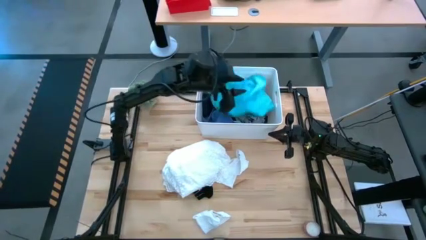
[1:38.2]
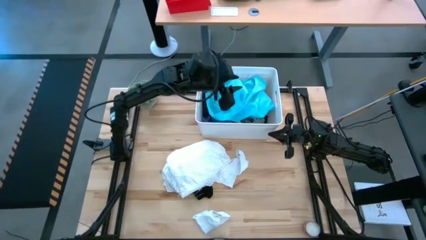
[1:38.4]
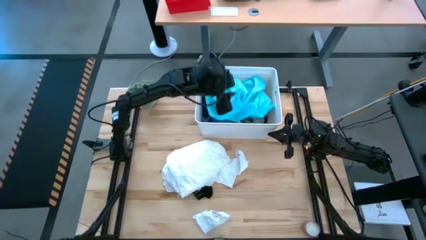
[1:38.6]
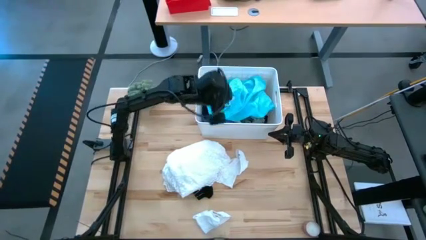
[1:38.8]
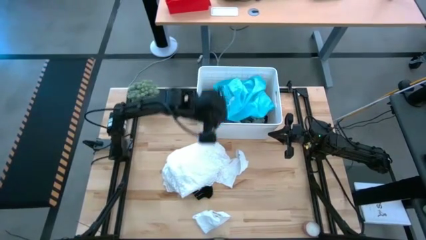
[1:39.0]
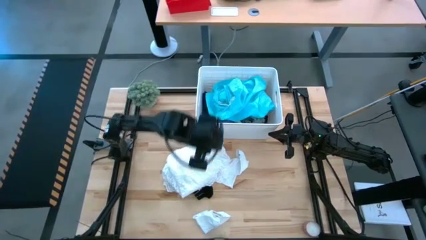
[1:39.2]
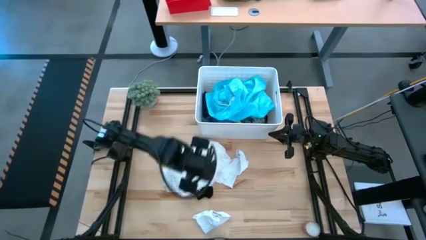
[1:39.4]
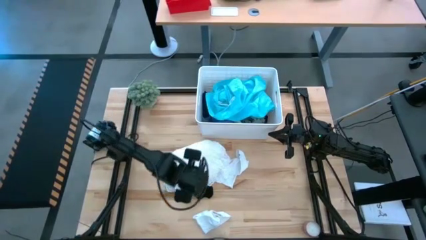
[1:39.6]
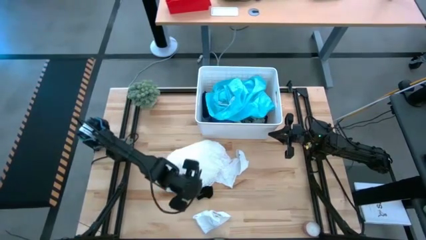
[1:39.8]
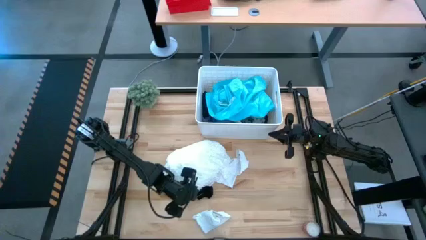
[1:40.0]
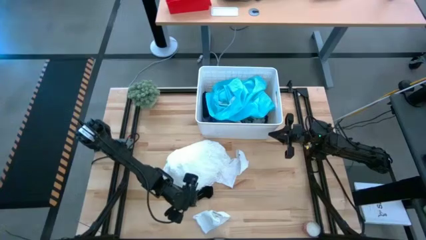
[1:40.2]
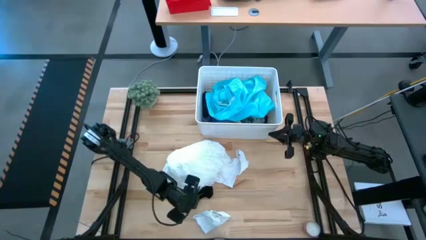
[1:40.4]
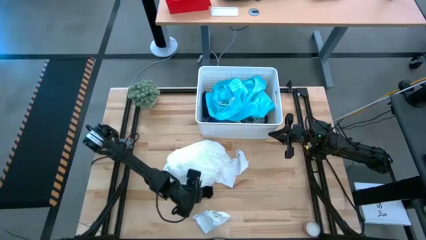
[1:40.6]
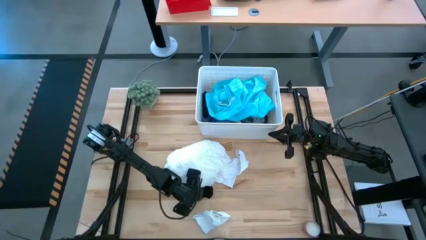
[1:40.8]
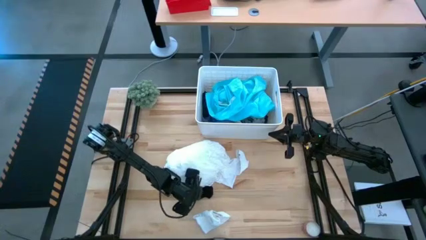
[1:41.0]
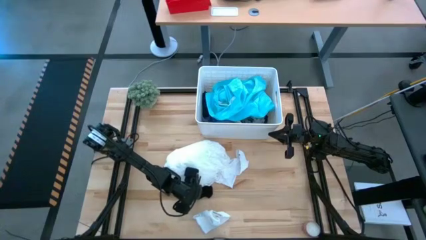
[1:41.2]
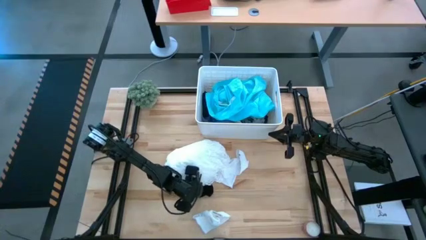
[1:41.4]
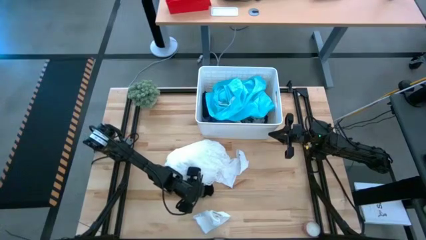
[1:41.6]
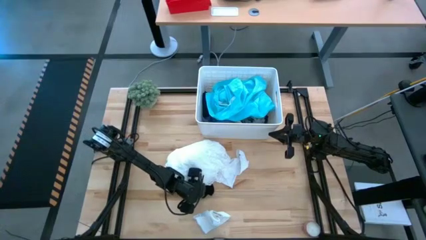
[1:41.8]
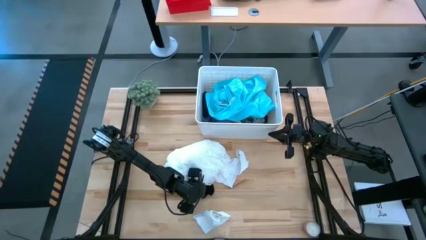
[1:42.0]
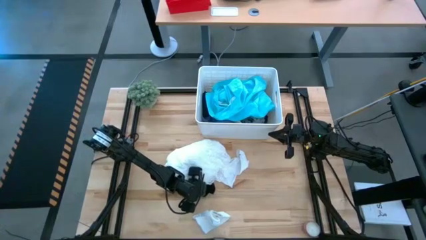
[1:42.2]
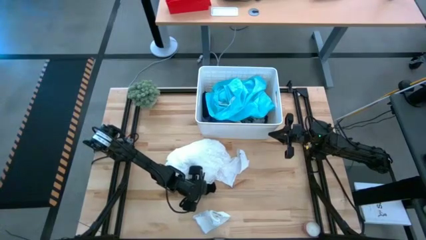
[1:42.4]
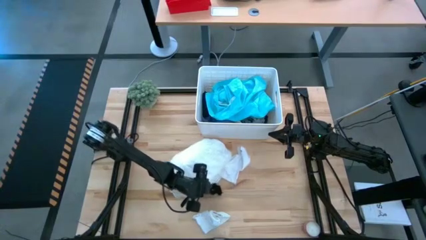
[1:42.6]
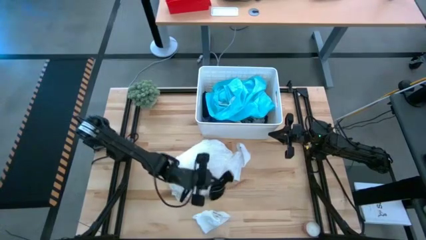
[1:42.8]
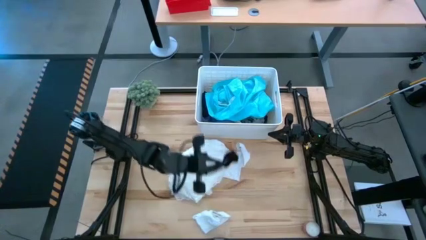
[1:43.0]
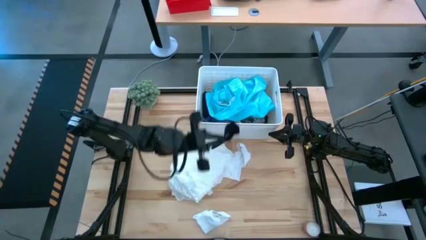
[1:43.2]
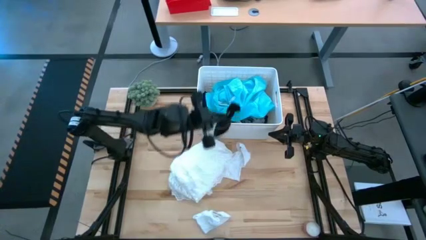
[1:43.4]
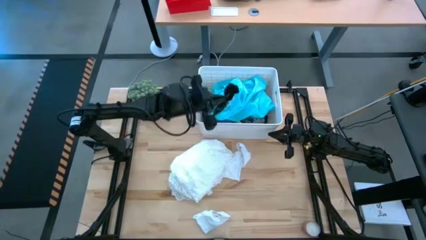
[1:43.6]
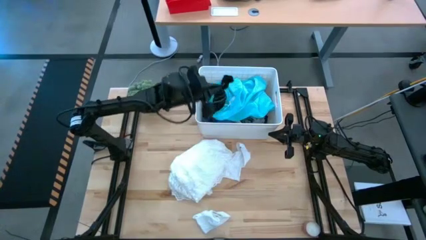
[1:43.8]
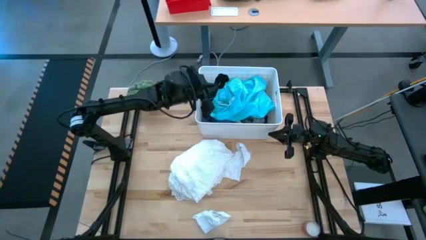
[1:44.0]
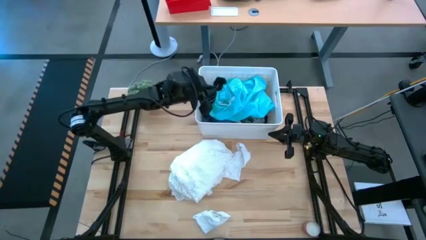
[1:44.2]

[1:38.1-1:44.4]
Task: Sort clothes
Put the black socks into the white bin

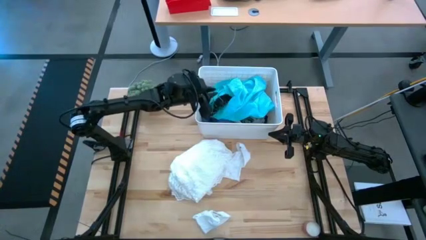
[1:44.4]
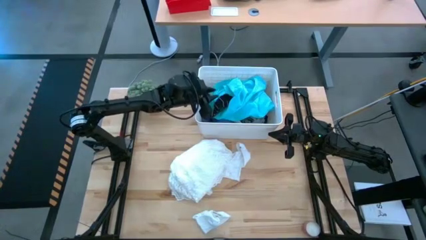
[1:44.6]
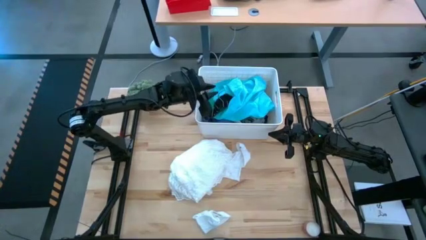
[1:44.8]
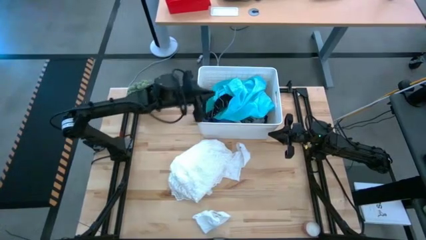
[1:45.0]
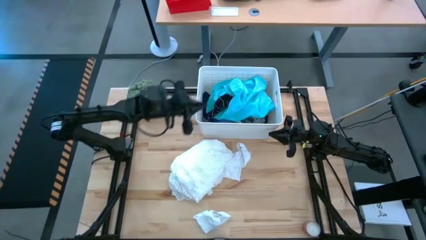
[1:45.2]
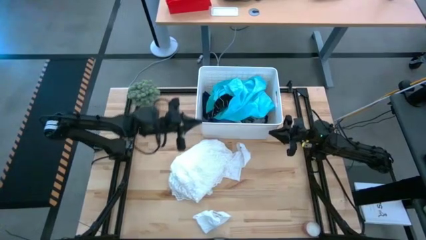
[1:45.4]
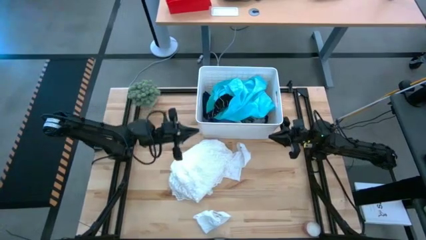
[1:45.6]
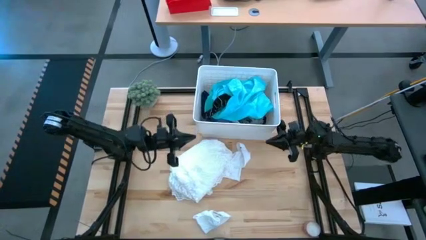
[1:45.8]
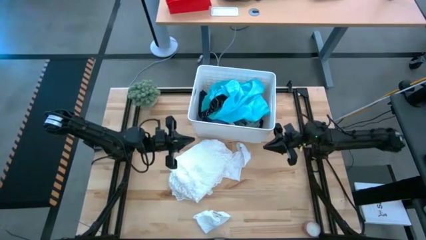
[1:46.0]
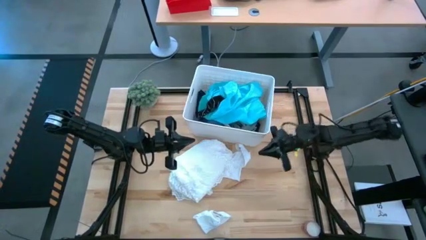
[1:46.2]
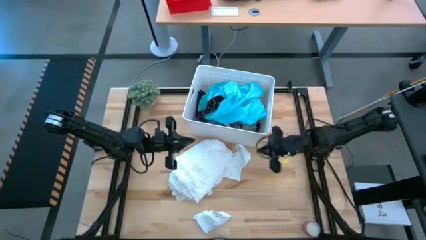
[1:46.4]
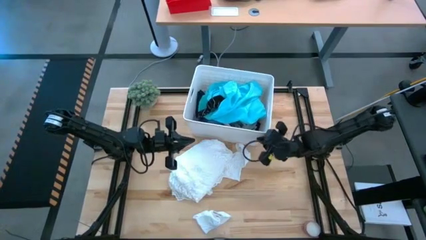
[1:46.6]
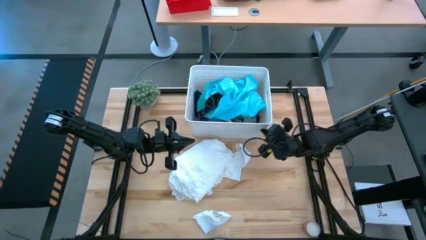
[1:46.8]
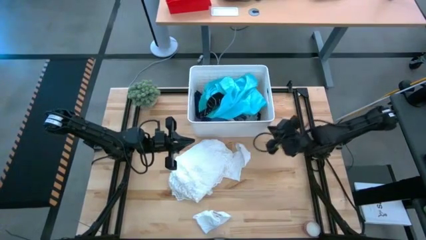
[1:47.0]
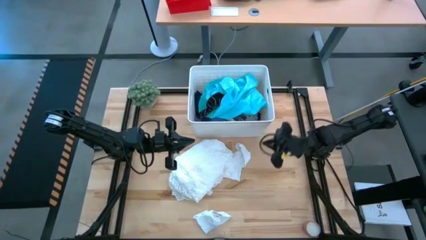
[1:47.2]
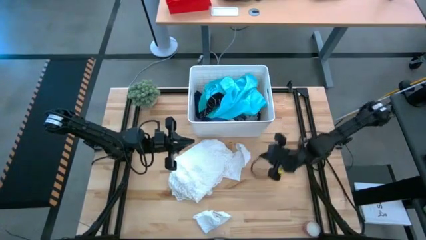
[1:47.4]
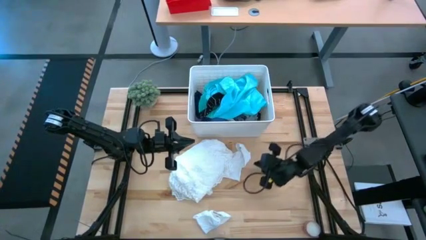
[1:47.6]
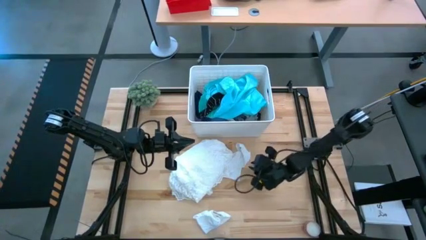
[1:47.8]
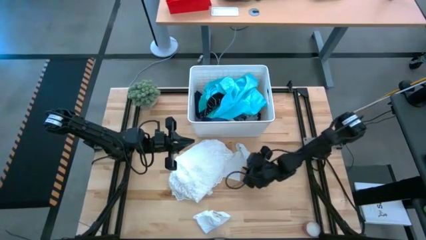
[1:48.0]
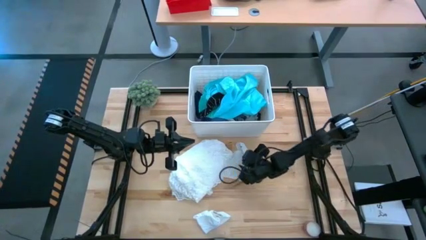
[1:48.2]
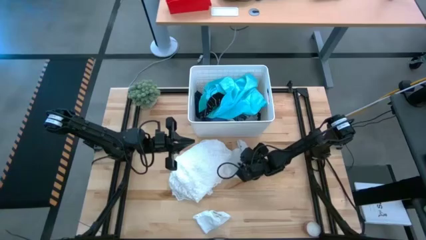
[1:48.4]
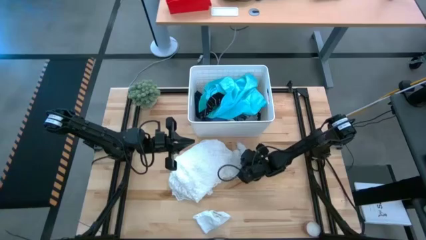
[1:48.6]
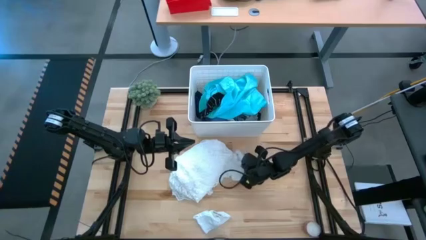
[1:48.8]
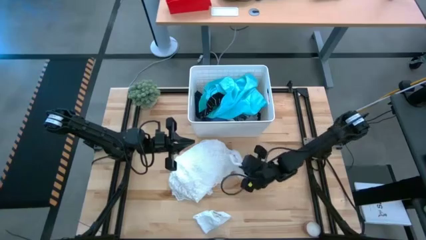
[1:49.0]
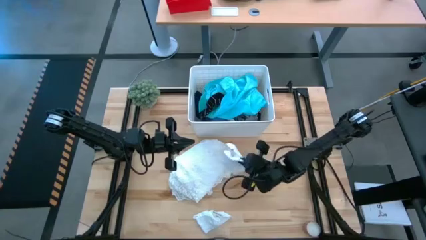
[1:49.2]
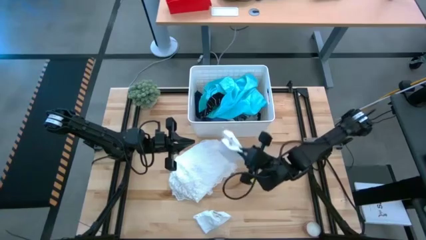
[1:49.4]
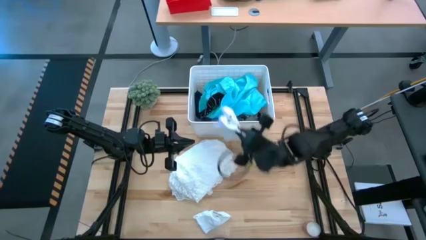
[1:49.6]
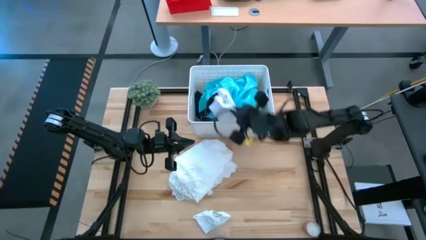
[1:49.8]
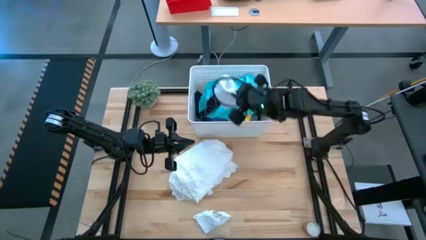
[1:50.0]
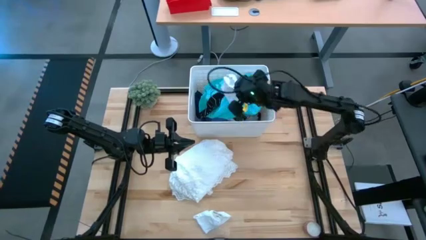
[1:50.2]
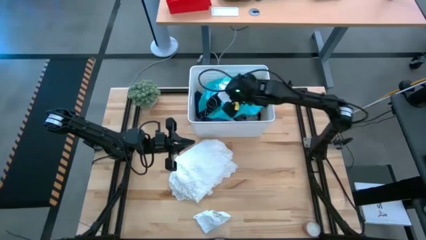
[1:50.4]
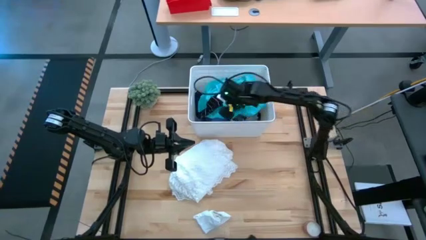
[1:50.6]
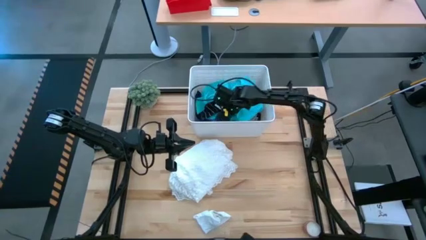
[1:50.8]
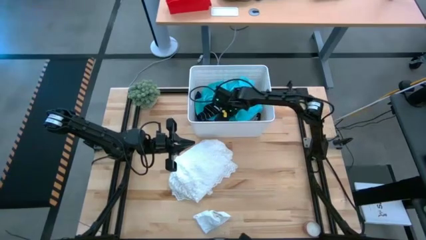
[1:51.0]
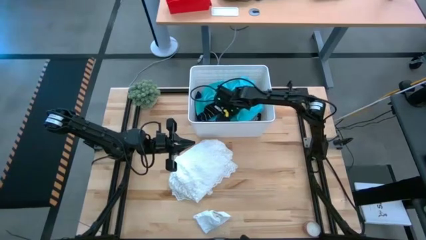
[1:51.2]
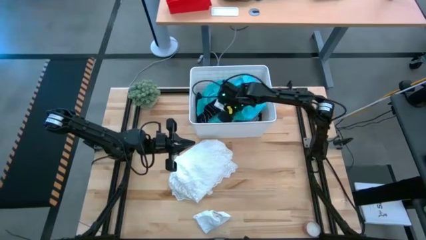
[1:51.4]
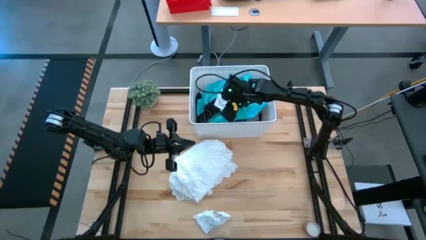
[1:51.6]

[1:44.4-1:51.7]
Put the top white socks into the white bin
